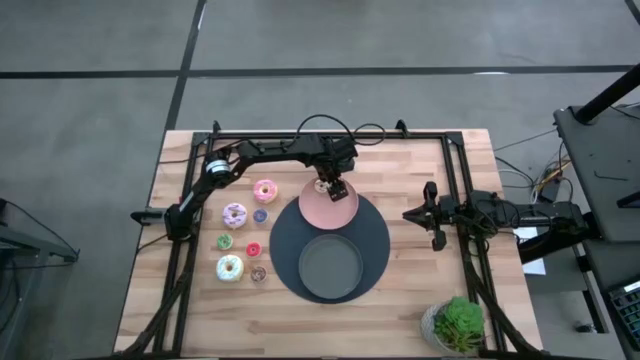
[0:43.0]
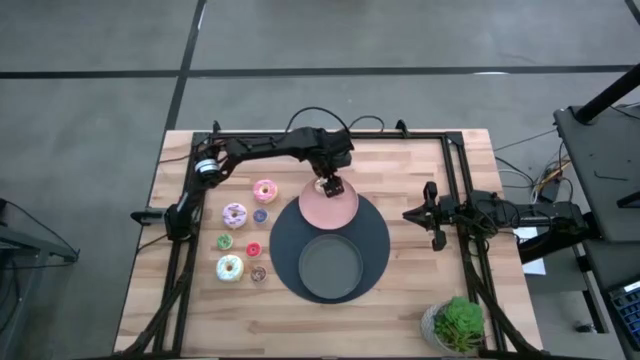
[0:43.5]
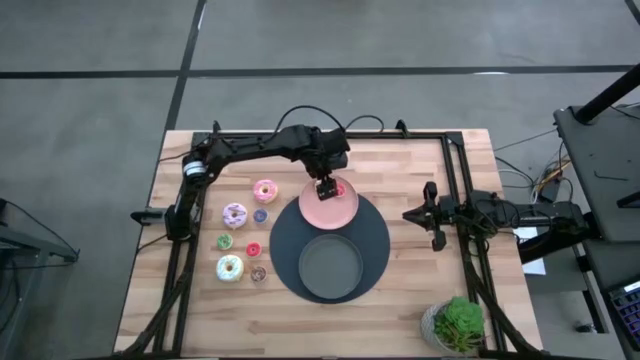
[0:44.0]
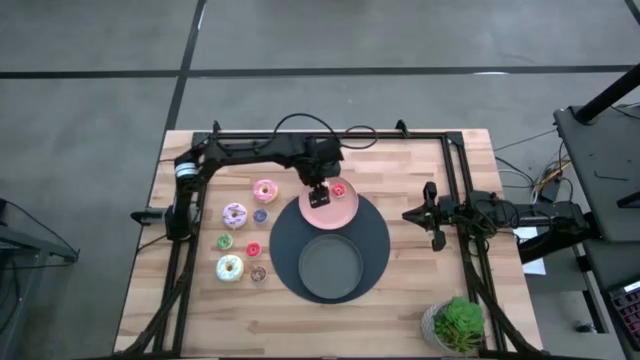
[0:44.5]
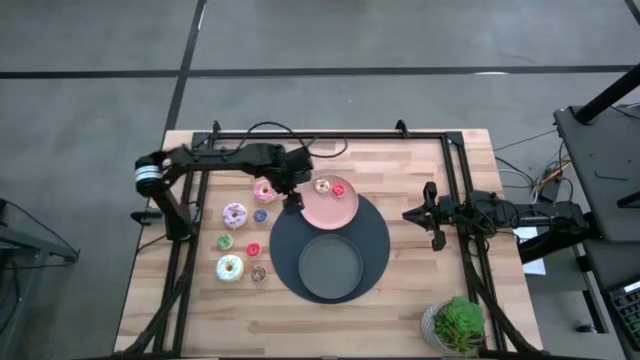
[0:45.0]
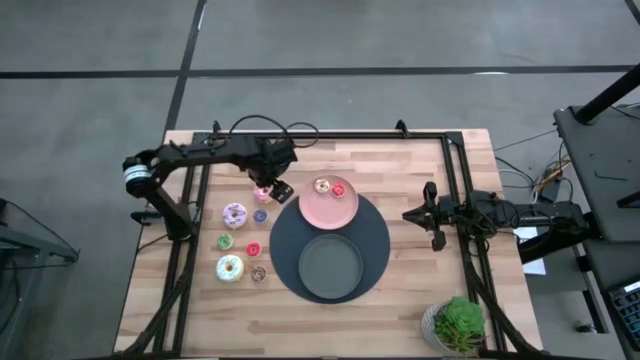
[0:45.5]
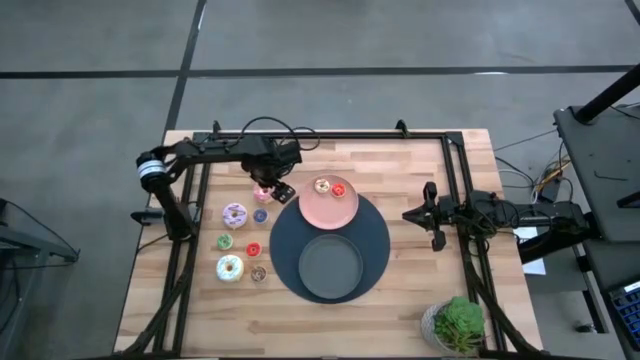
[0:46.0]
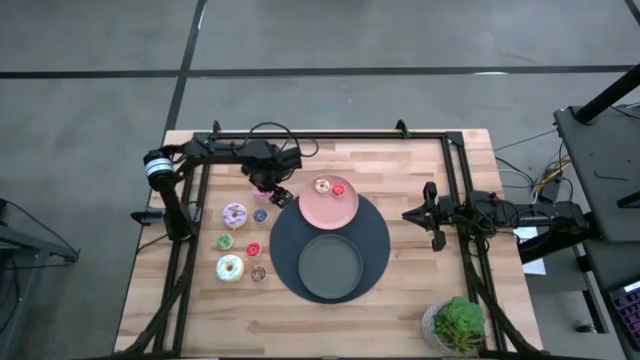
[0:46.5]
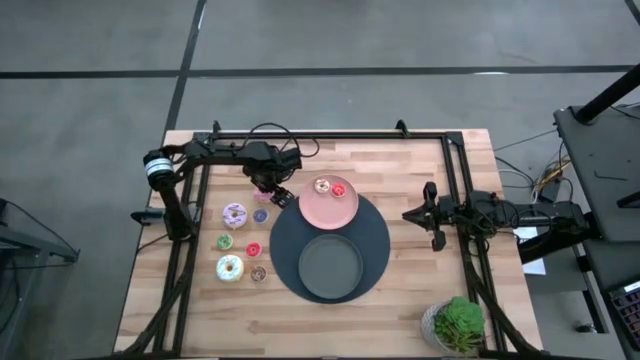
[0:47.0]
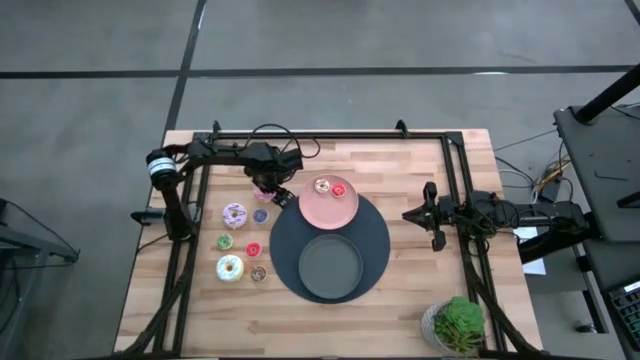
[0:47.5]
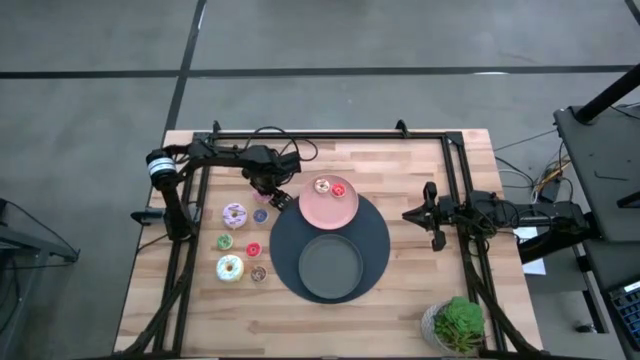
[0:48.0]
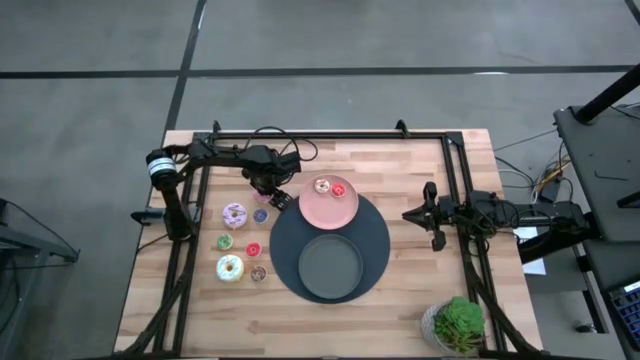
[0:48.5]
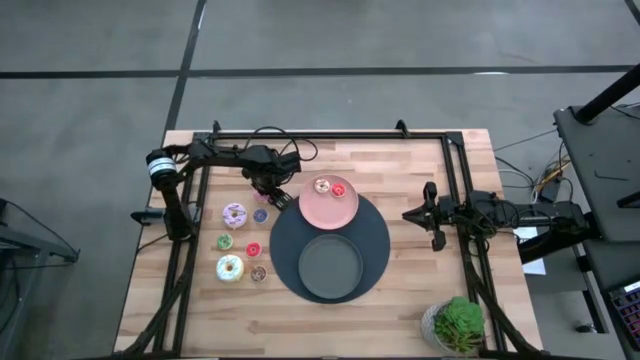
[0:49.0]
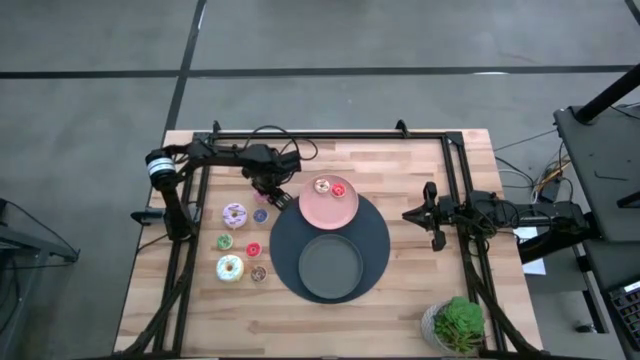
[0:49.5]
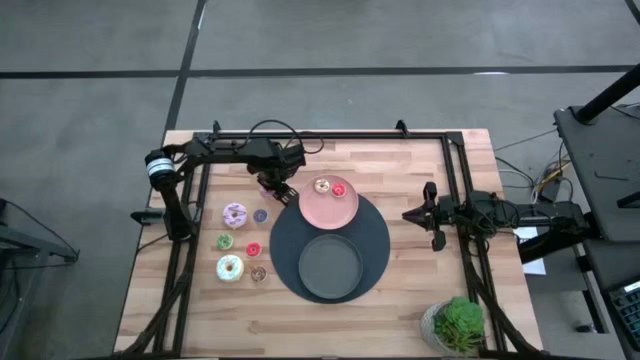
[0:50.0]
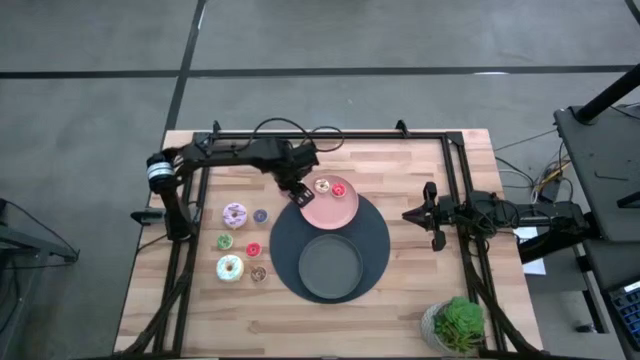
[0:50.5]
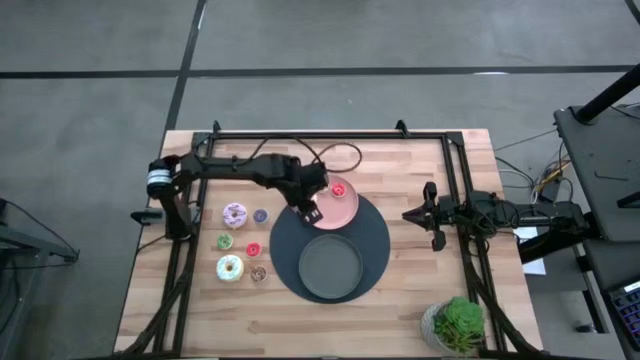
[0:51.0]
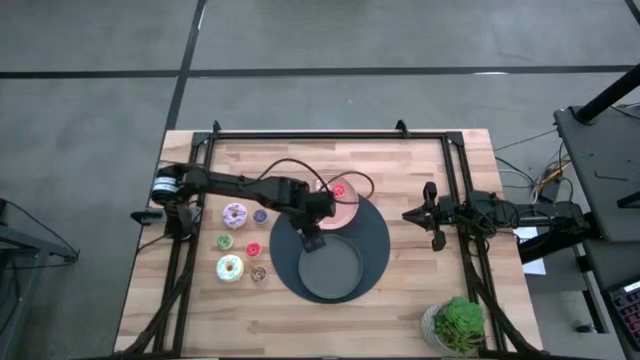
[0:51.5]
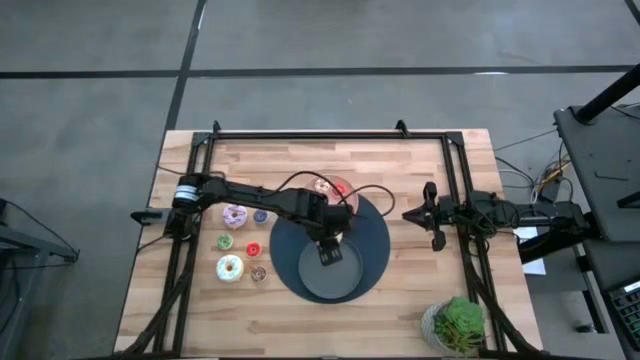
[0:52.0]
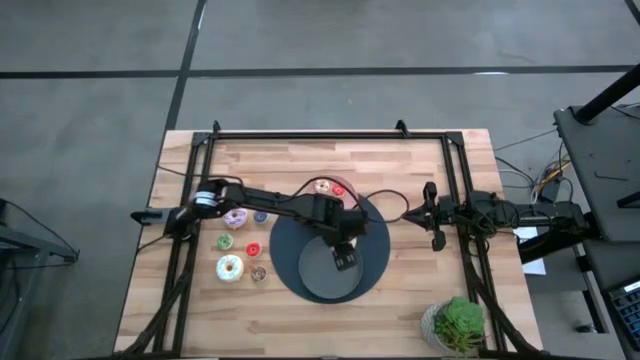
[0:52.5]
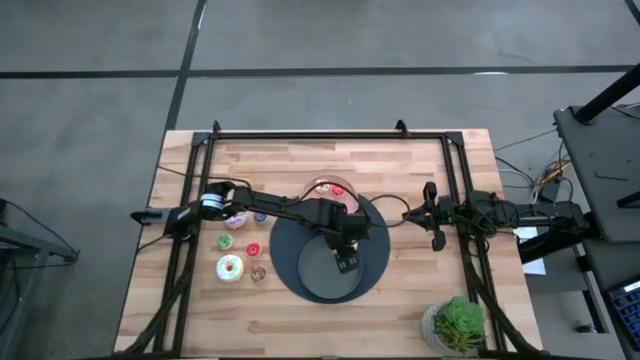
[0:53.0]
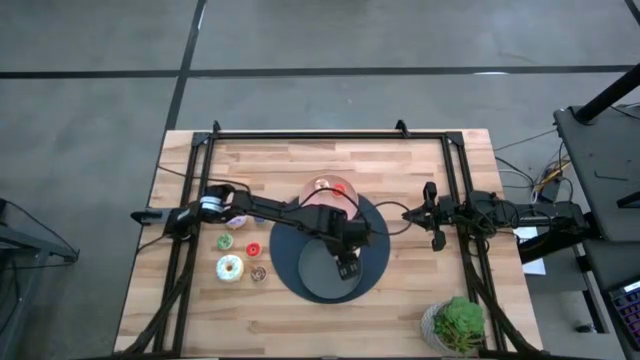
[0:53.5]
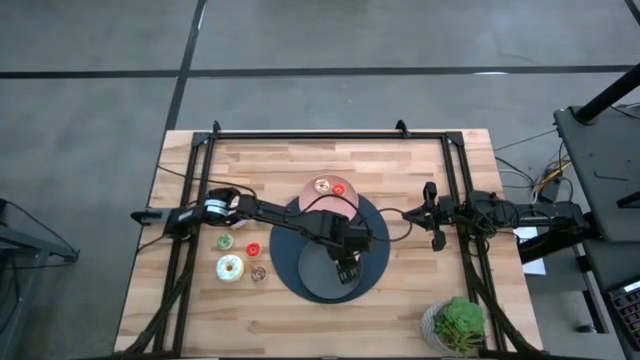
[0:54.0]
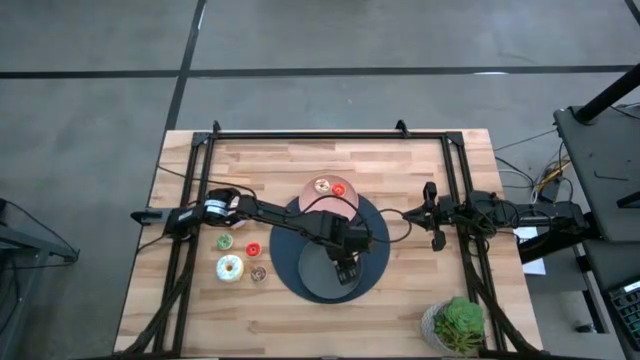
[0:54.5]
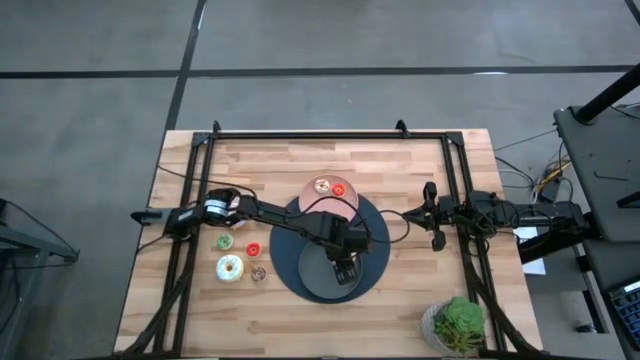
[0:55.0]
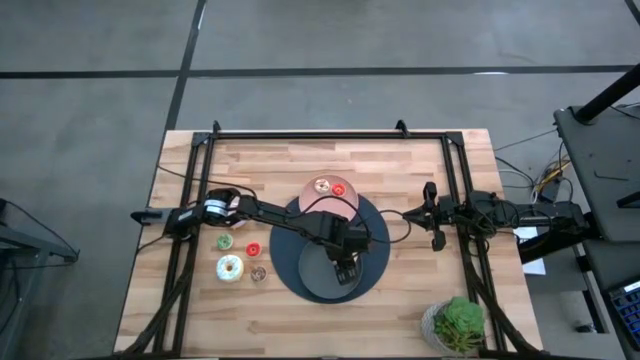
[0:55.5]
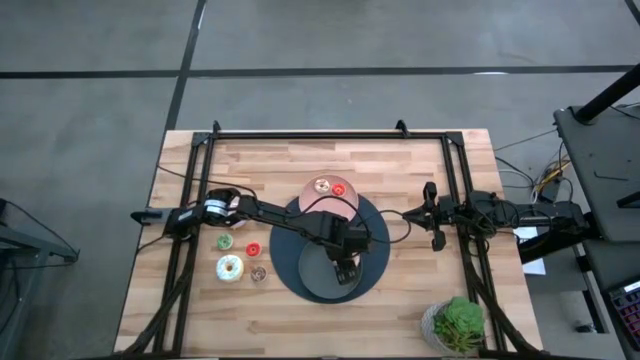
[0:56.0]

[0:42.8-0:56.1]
Task: Pick & Place donuts
Put the large pink donut on the gray plate
